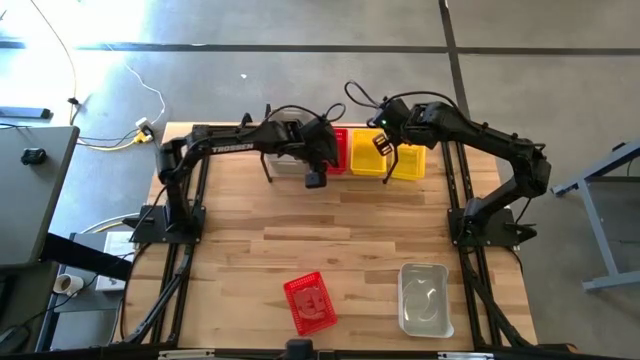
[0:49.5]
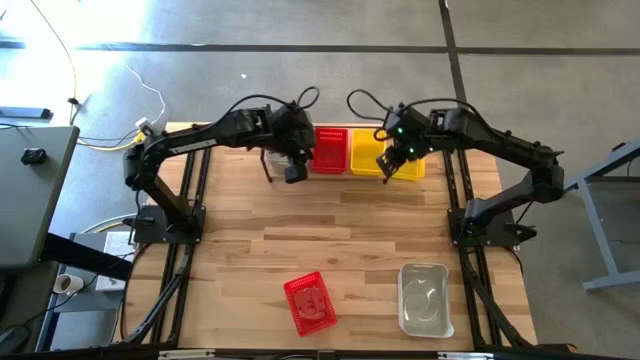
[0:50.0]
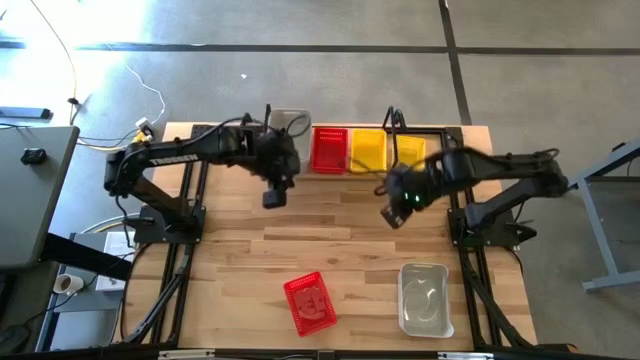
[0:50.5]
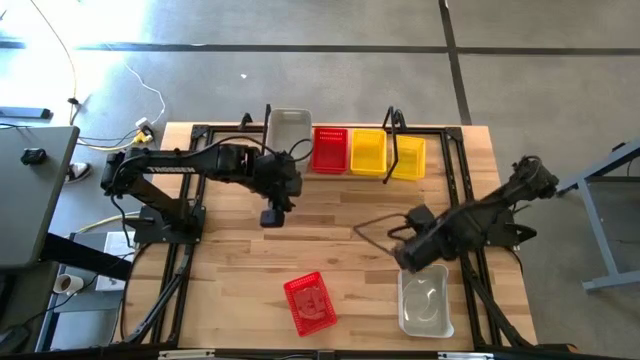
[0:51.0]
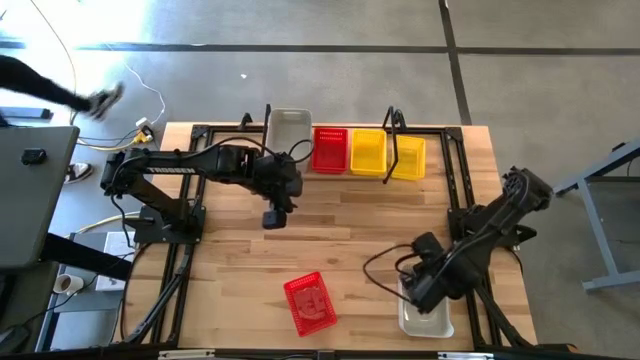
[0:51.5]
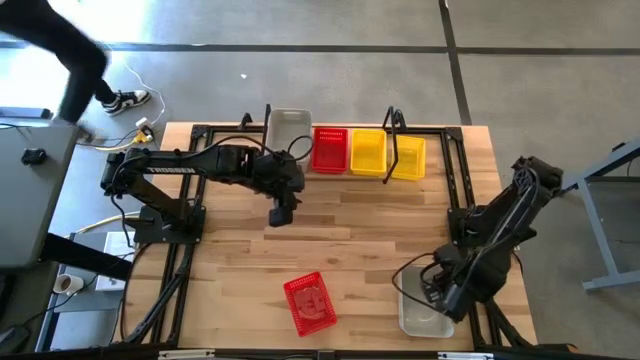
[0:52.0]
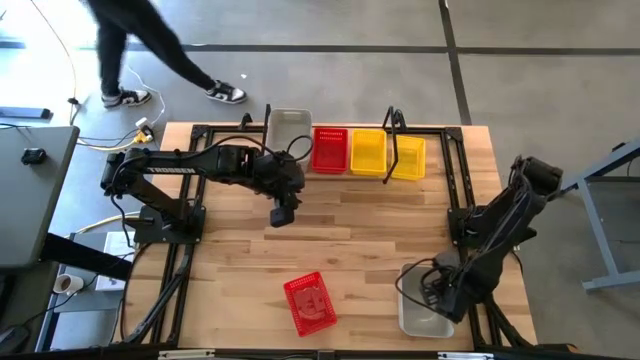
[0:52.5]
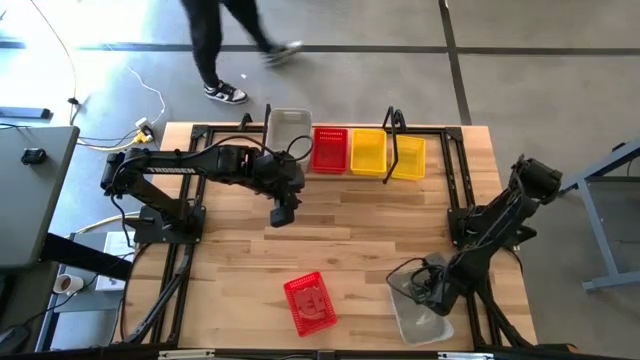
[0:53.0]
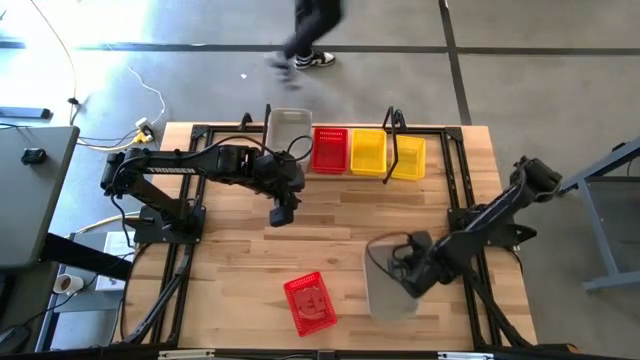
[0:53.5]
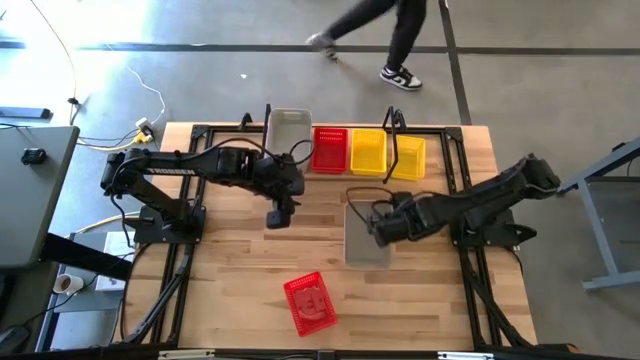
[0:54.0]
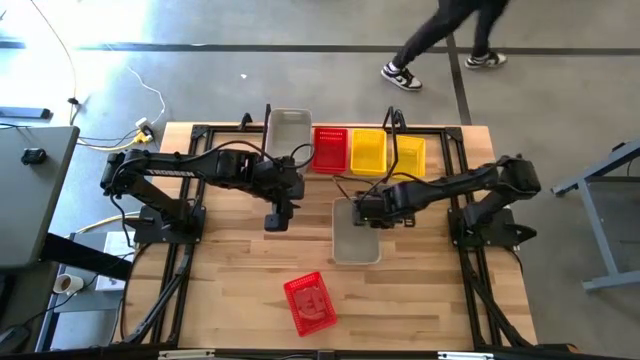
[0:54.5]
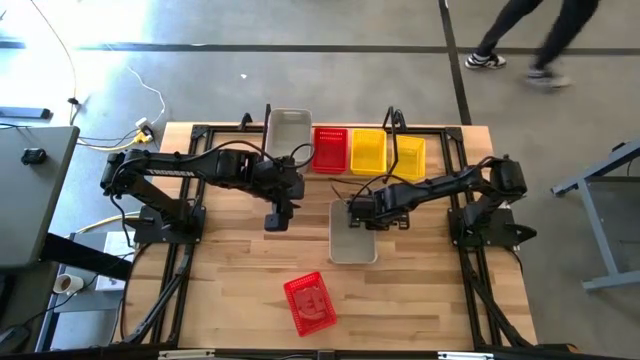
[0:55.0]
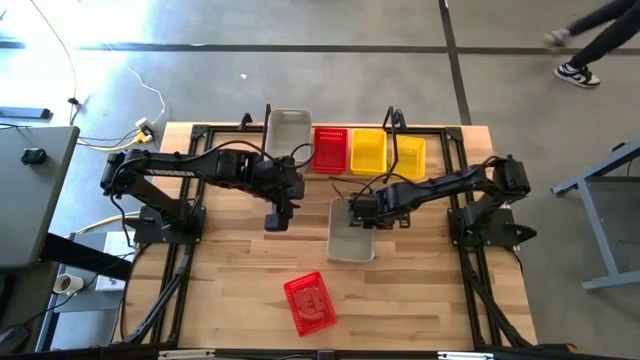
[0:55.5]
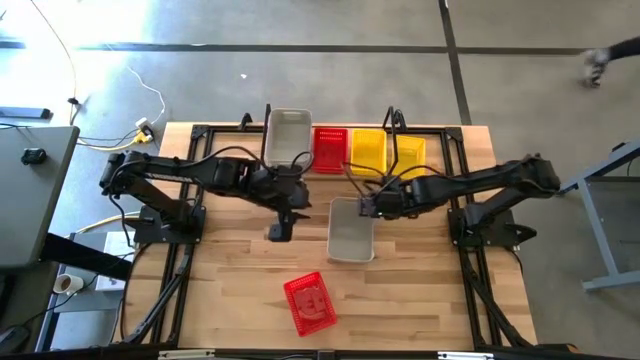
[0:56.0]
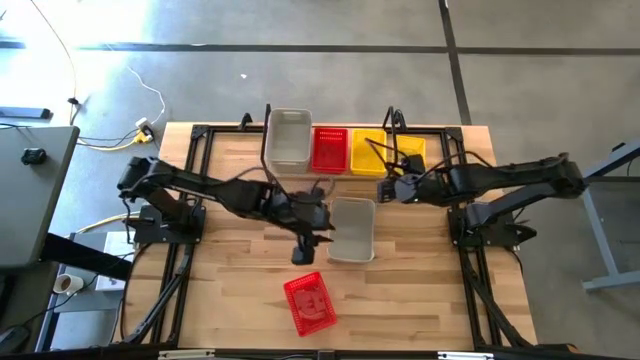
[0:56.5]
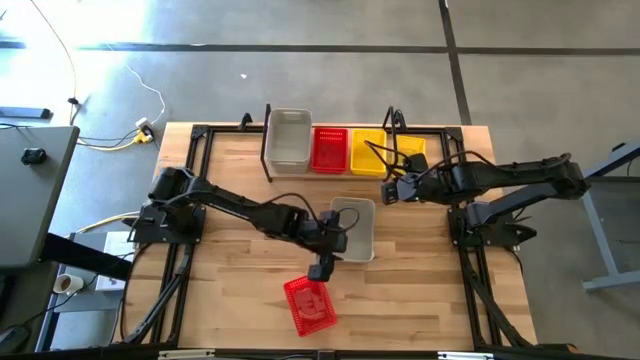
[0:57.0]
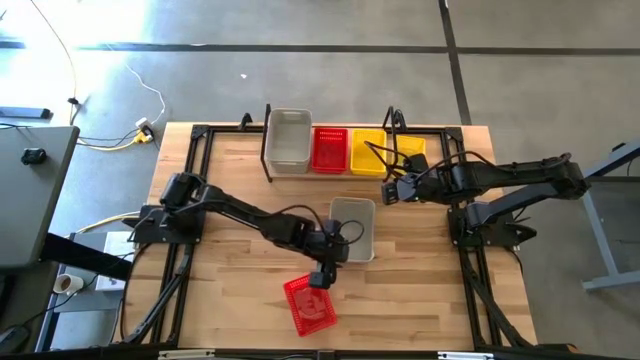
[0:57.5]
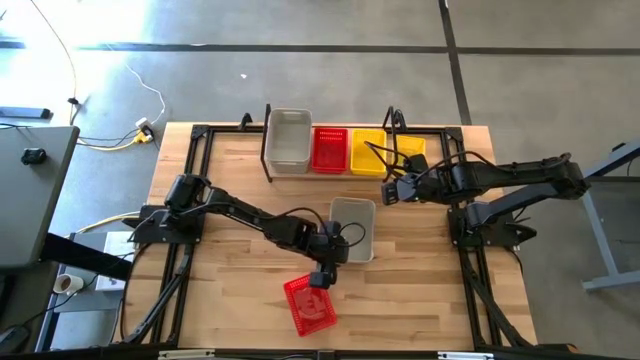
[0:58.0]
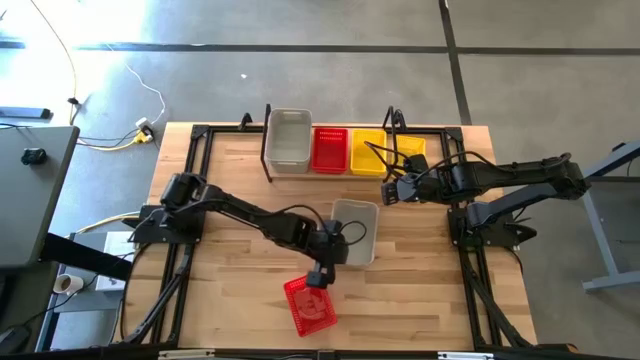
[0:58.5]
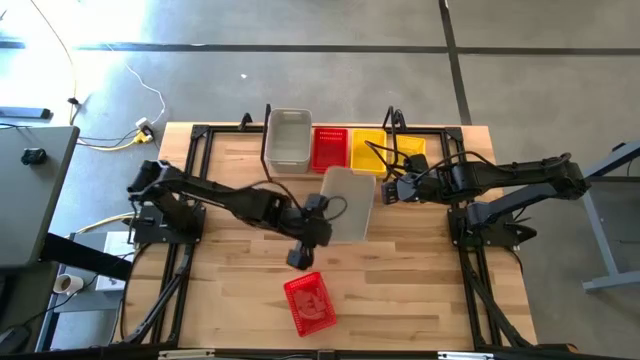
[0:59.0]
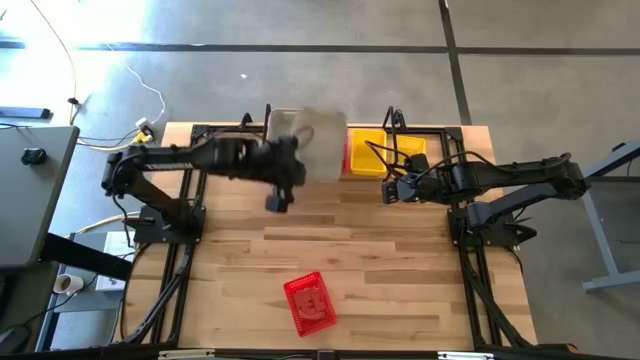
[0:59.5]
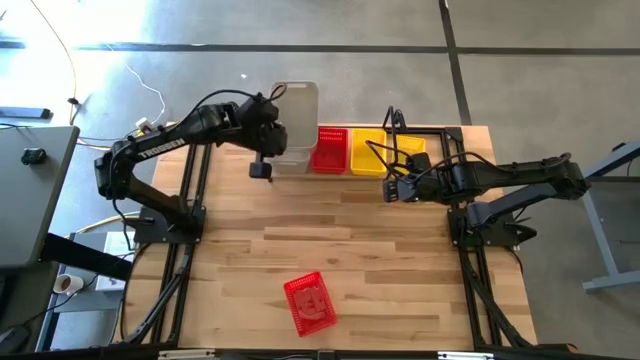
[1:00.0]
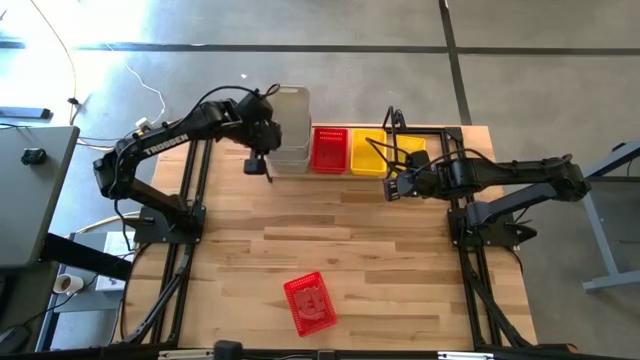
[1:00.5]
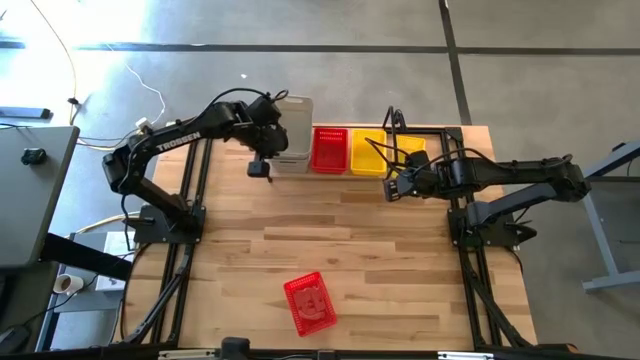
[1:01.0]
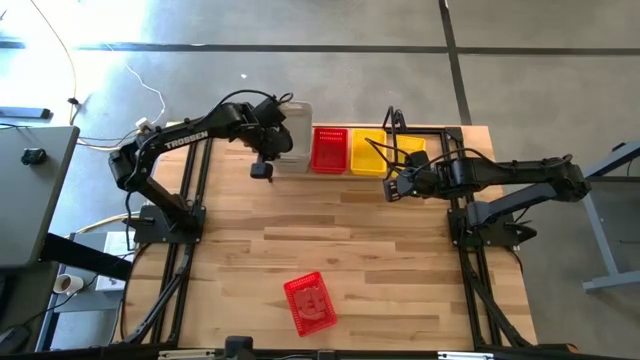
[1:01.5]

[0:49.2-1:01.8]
Task: Stack baskets on shelf by color
Stack the white bin on top of the white bin

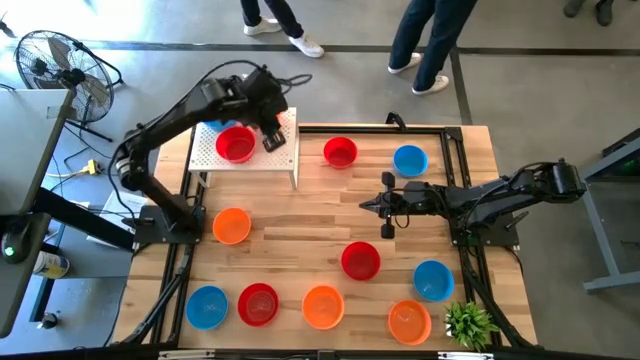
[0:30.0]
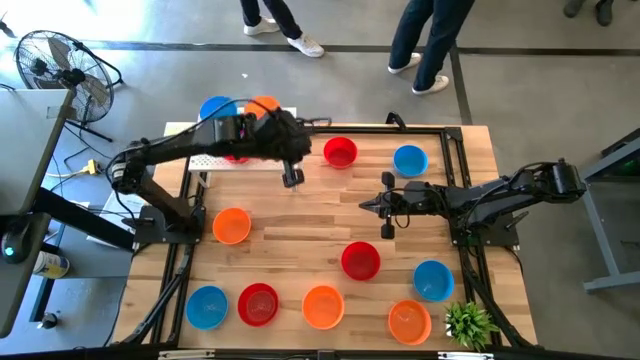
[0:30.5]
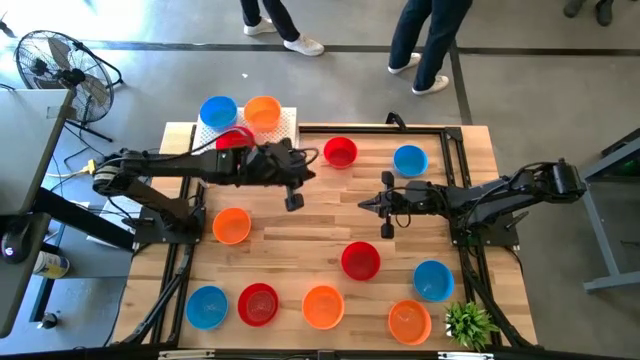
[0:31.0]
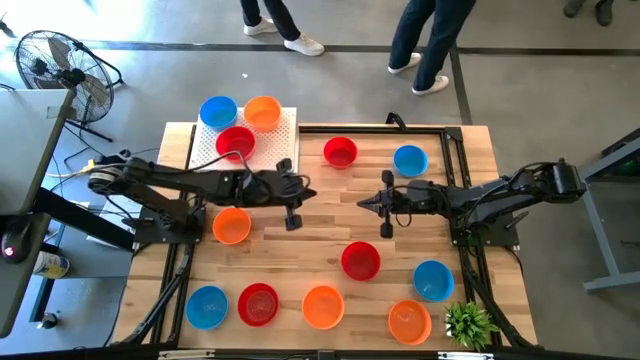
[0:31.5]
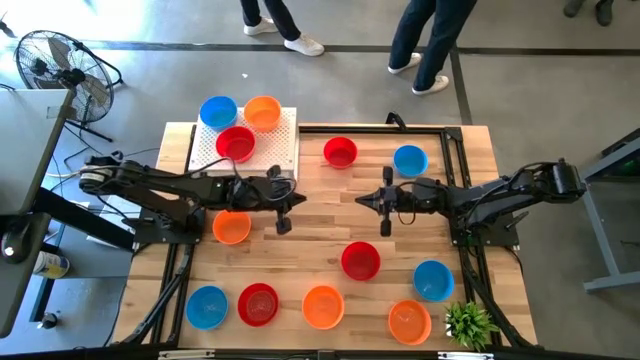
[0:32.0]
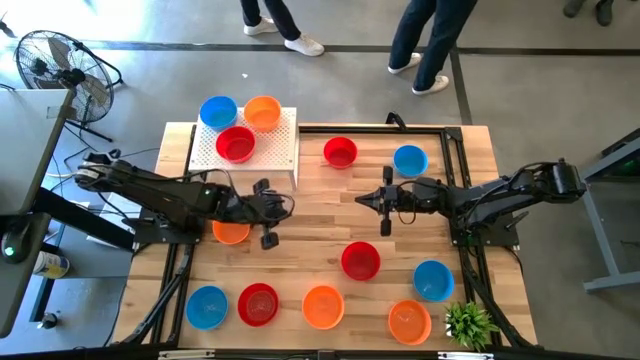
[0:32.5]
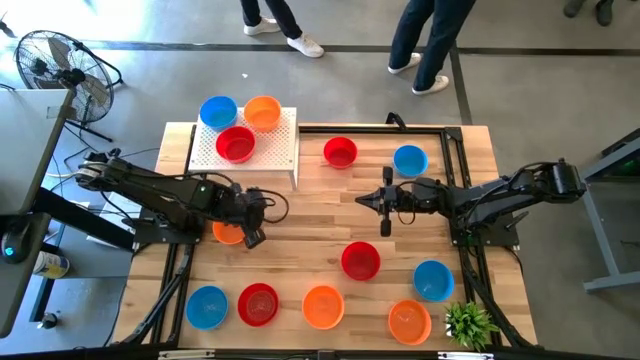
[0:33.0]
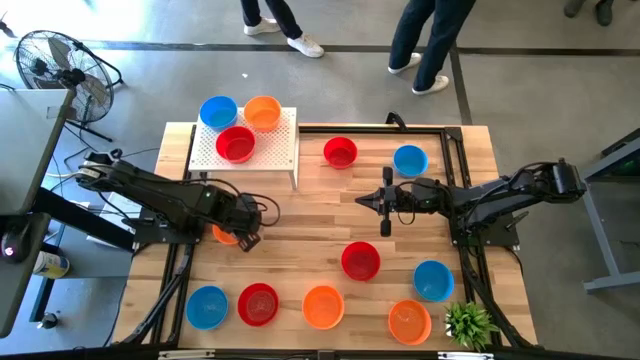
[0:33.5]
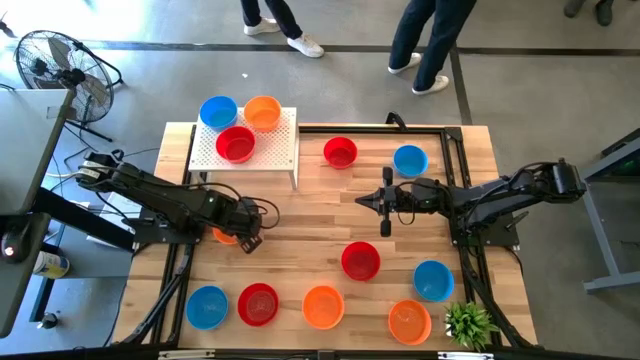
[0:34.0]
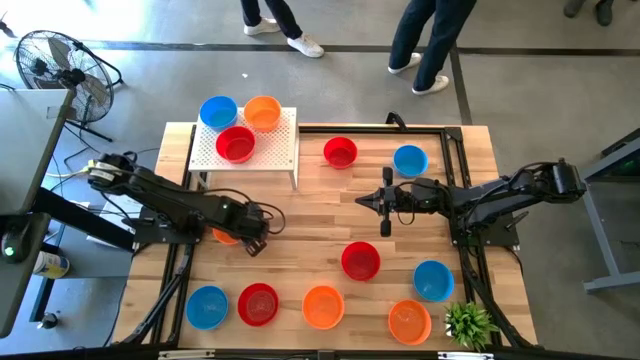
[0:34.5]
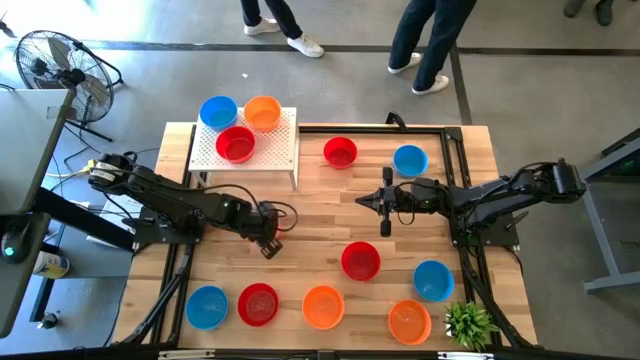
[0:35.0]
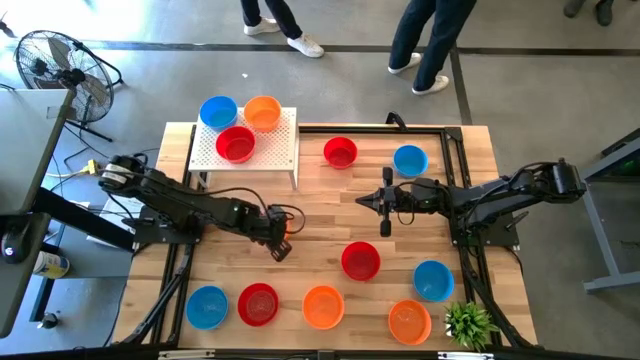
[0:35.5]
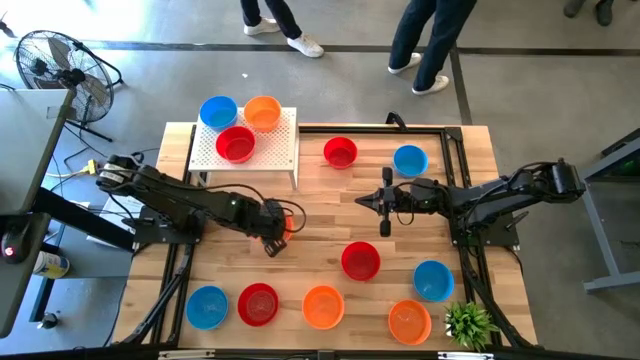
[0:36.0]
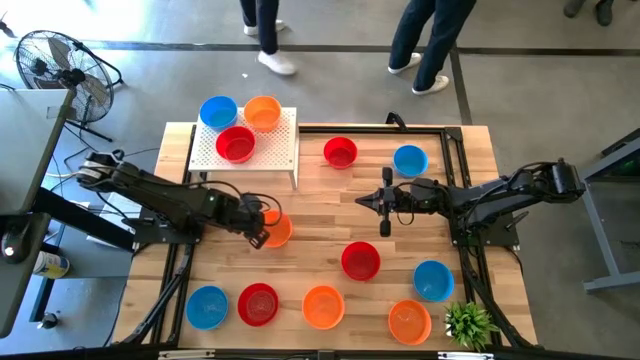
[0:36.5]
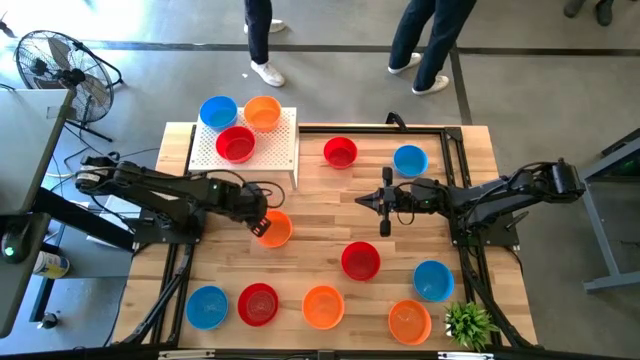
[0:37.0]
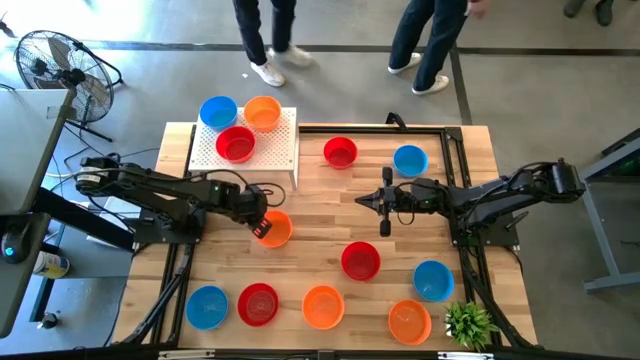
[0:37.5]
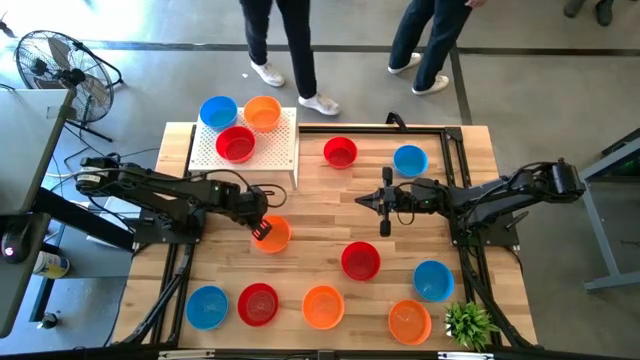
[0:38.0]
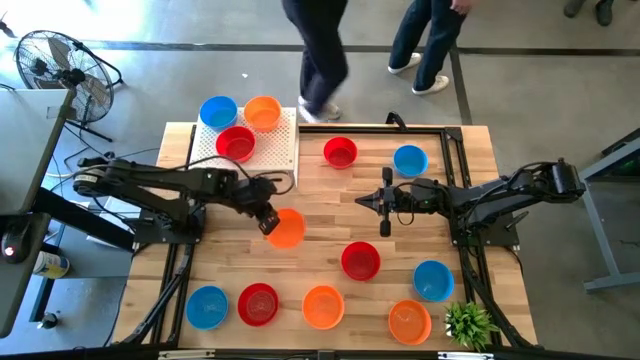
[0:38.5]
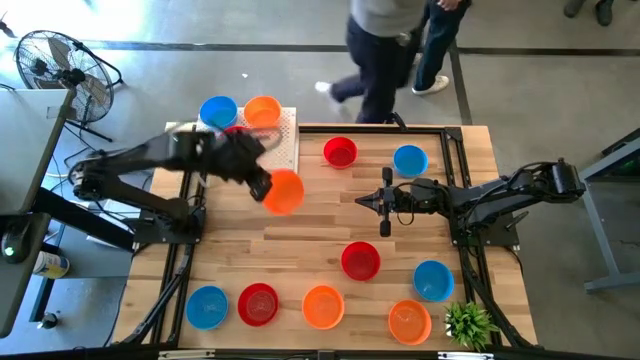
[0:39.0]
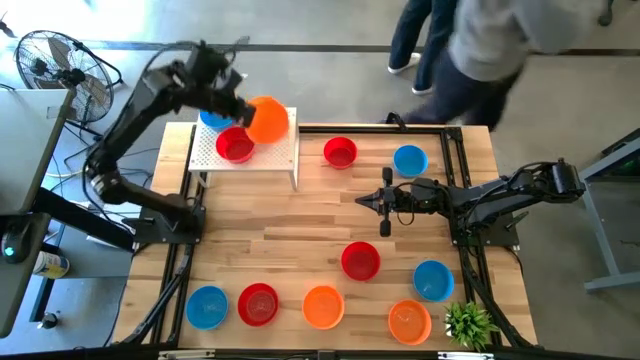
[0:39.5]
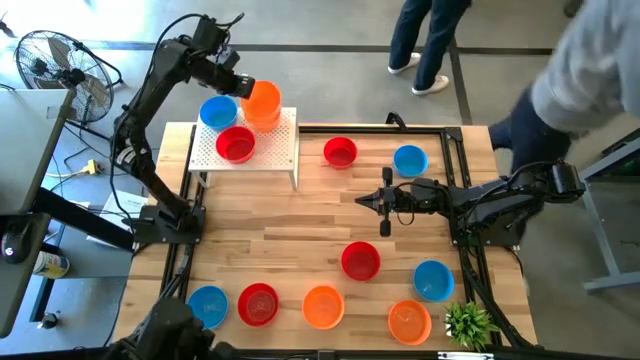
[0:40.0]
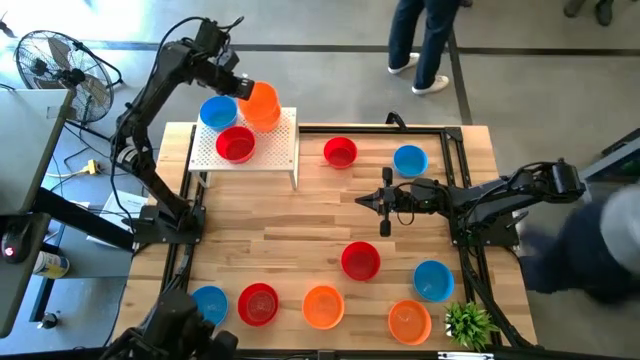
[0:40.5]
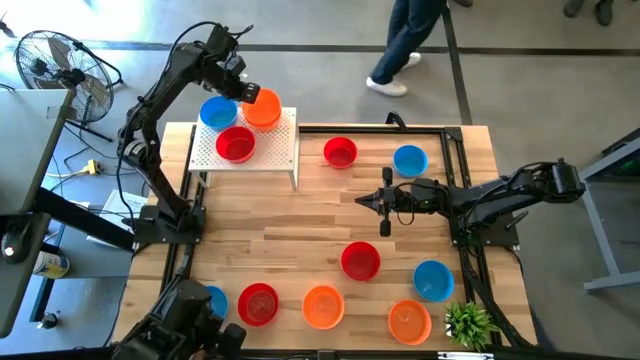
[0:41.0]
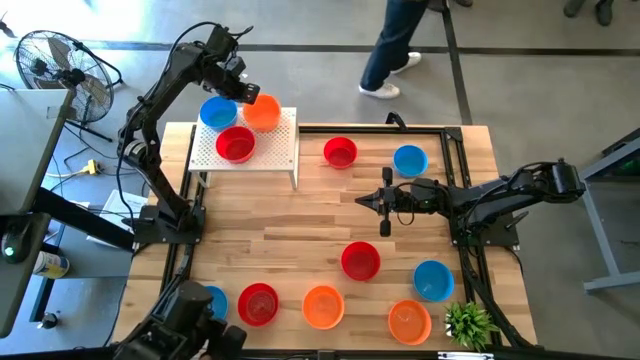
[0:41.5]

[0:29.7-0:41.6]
Task: Pick & Place Mini bowls
Stack the orange bowl on top of the orange bowl on the shelf
